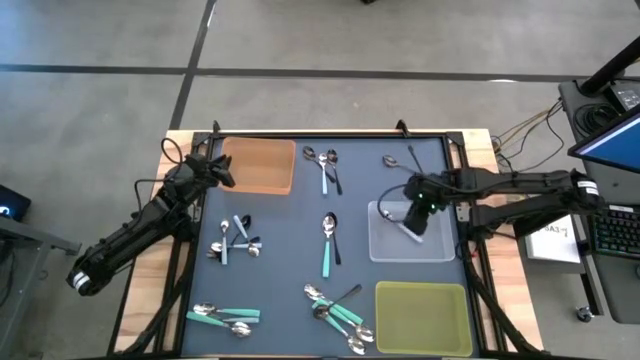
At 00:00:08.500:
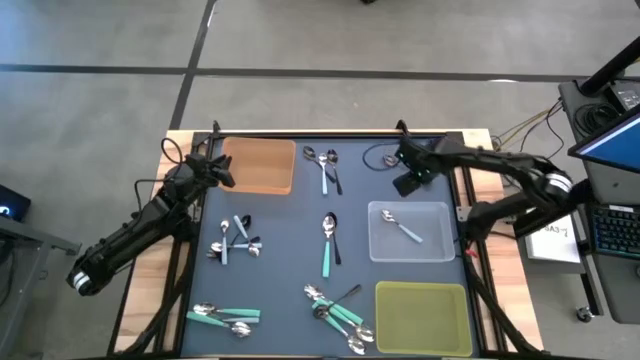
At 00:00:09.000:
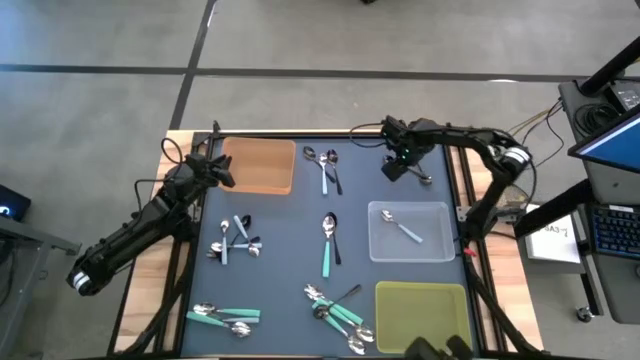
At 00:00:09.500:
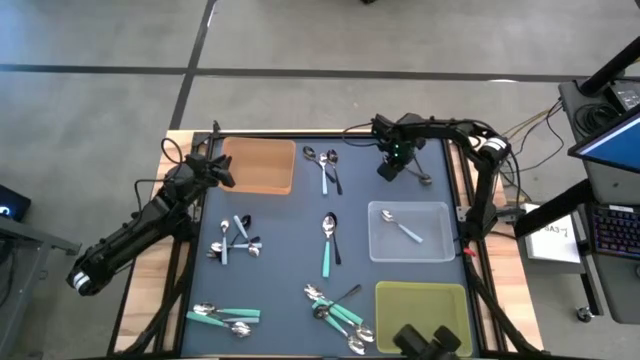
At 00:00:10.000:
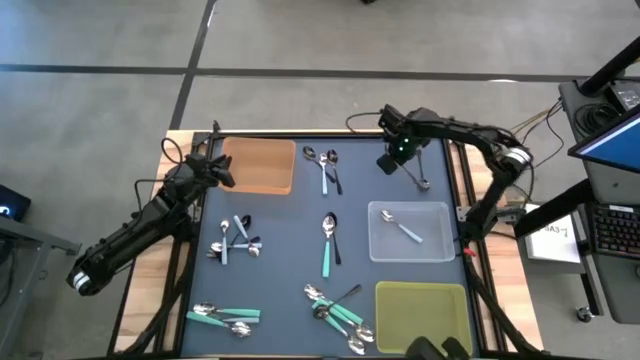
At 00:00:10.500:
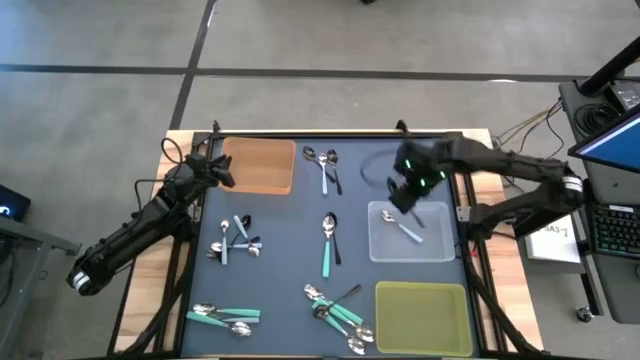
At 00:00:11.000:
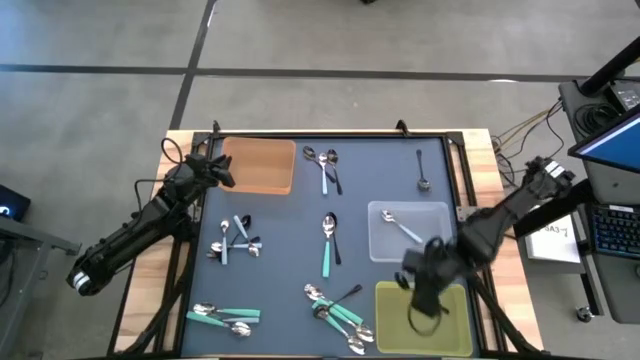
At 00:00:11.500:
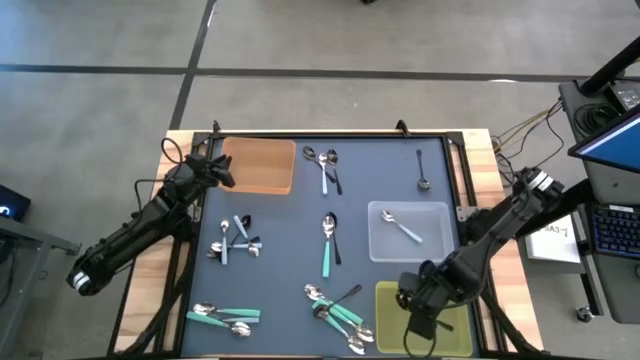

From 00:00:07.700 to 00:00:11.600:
Task: Sort silverware by color (type)
Put the black spoon into the yellow bin

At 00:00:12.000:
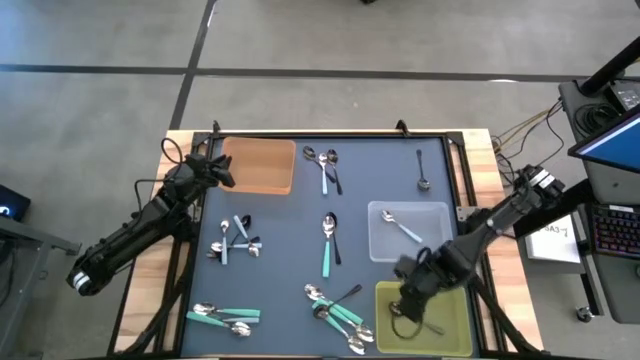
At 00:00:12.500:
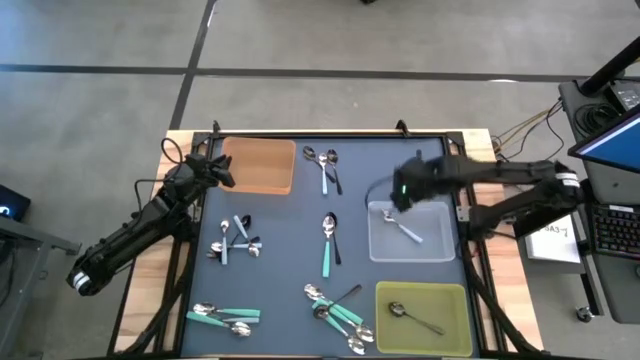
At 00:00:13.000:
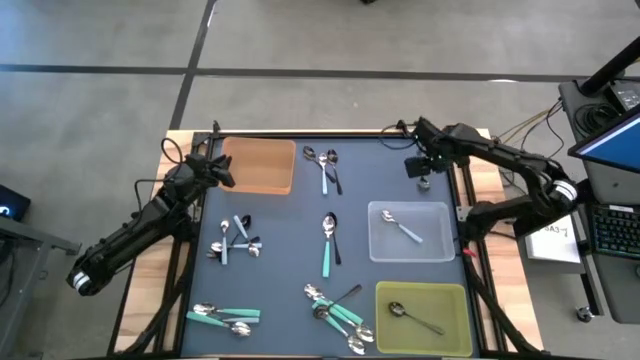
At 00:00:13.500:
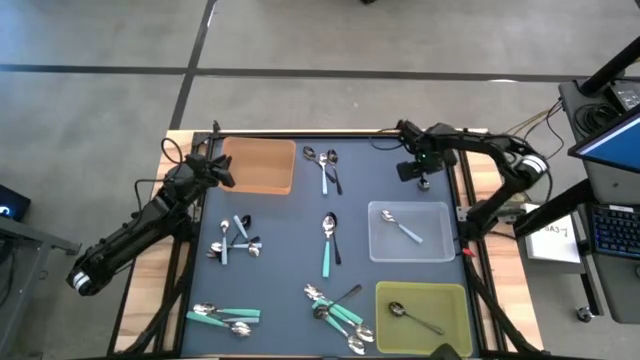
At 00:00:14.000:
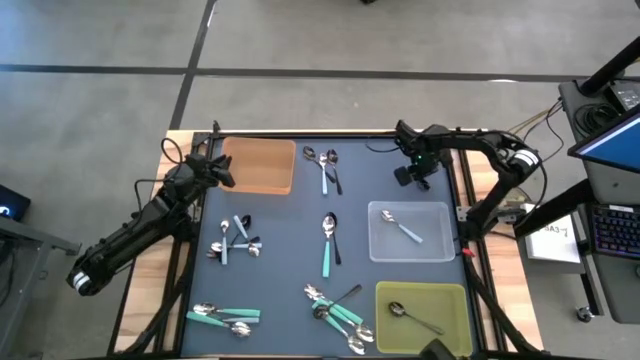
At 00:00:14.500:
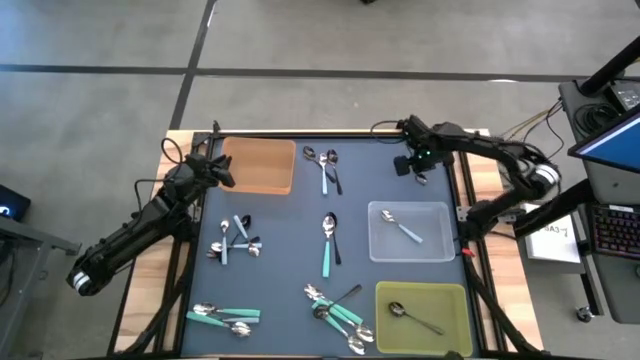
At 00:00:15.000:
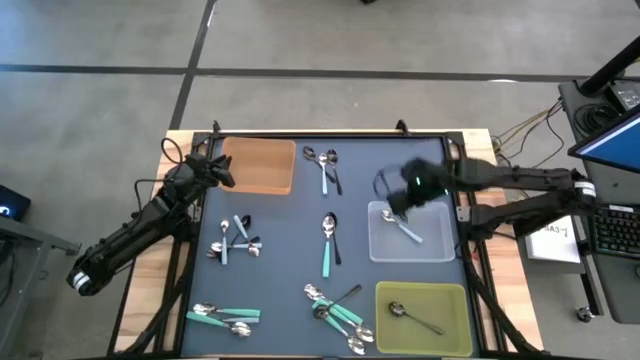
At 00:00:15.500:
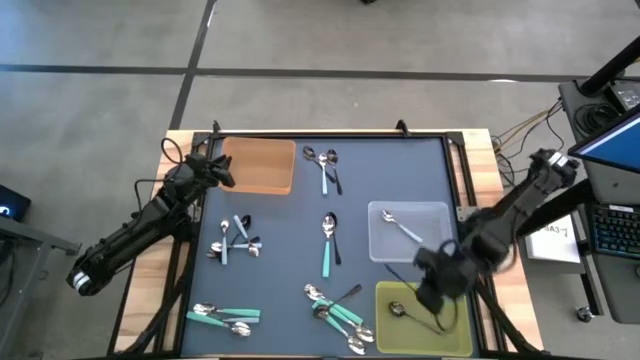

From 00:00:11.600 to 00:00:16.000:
Put the black spoon into the yellow bin

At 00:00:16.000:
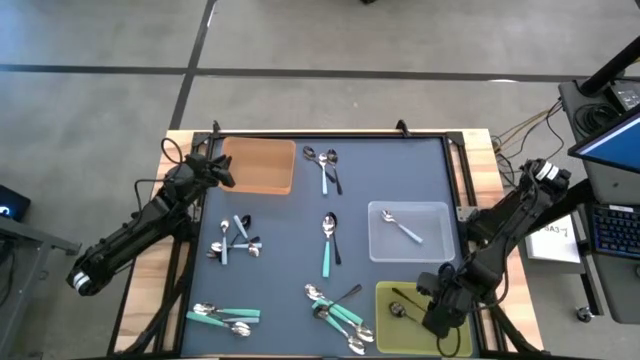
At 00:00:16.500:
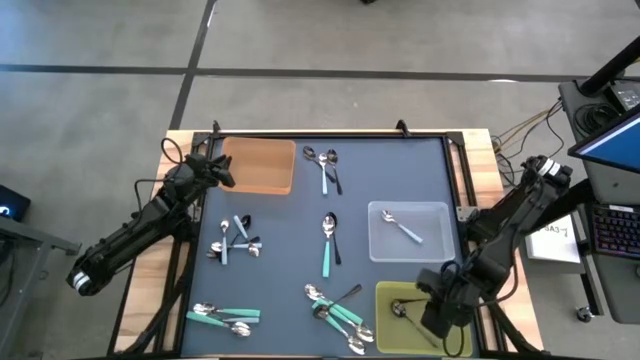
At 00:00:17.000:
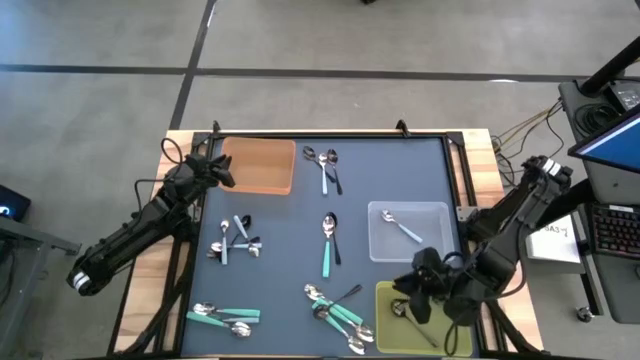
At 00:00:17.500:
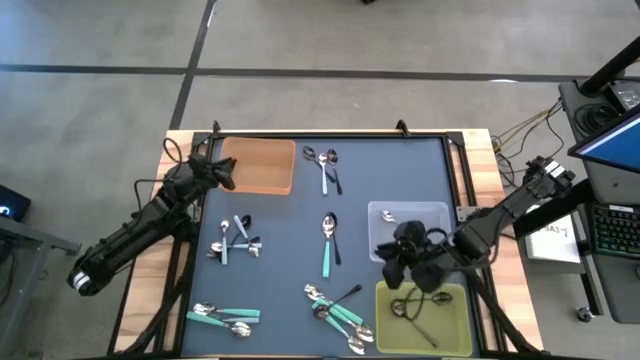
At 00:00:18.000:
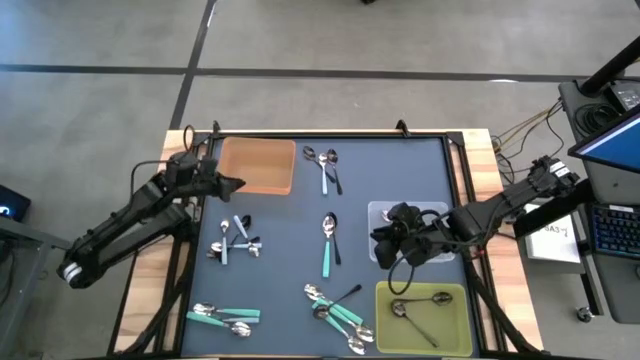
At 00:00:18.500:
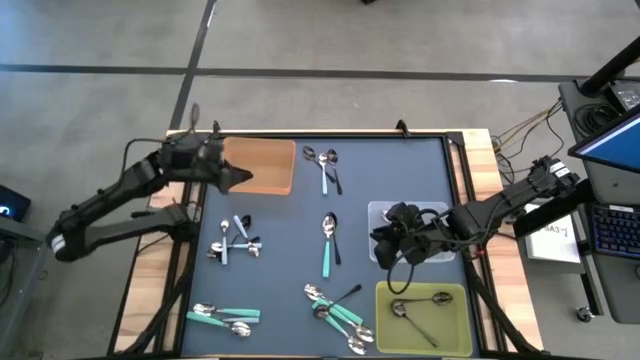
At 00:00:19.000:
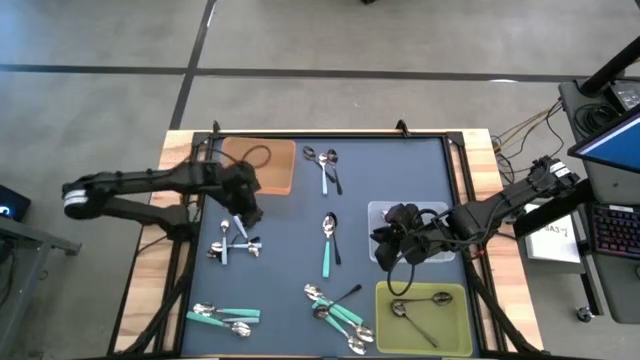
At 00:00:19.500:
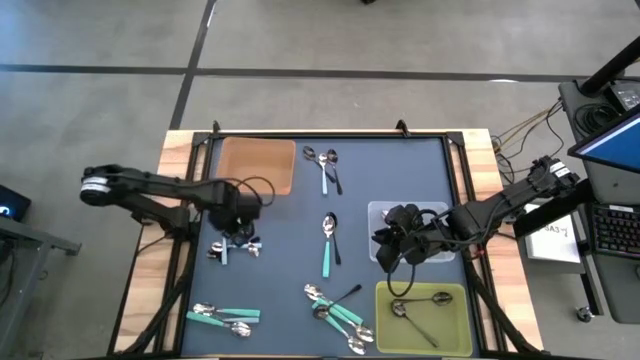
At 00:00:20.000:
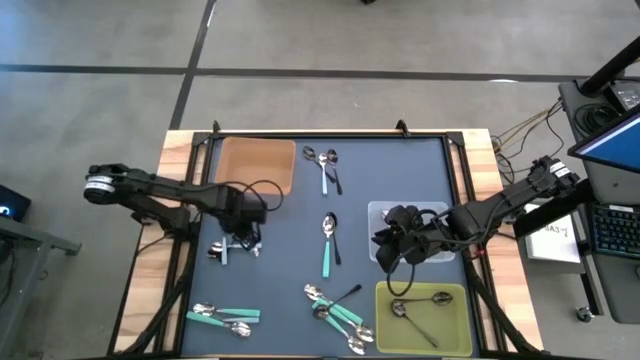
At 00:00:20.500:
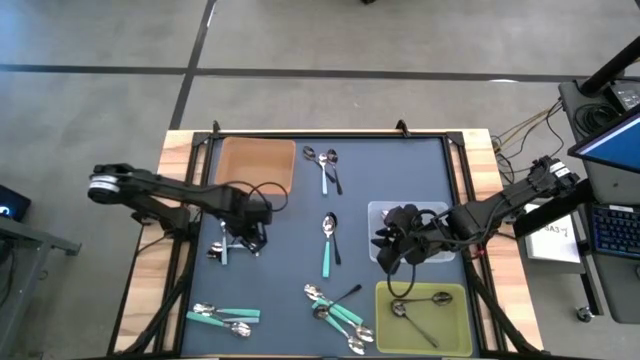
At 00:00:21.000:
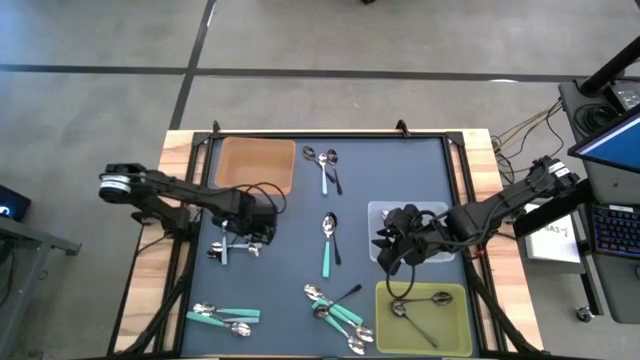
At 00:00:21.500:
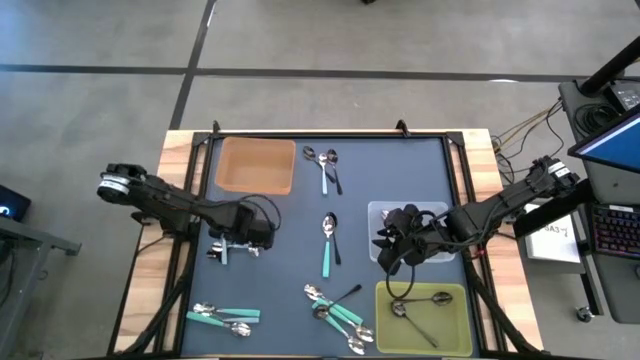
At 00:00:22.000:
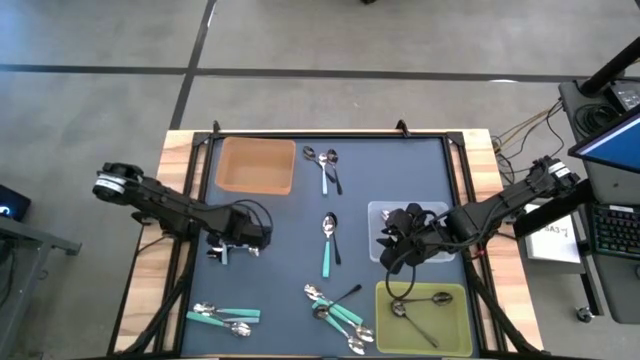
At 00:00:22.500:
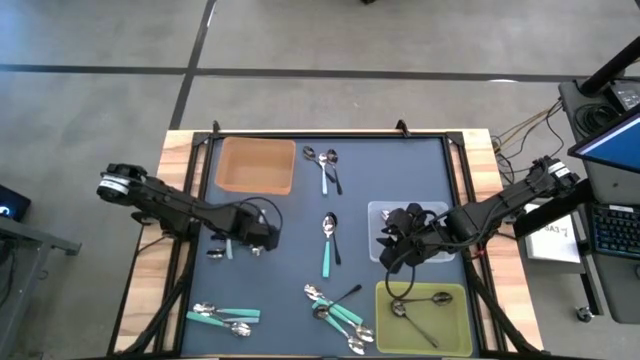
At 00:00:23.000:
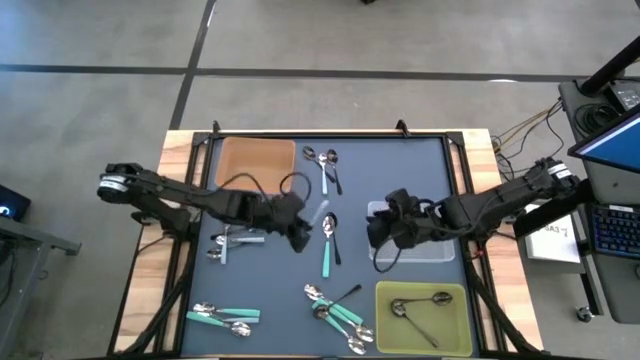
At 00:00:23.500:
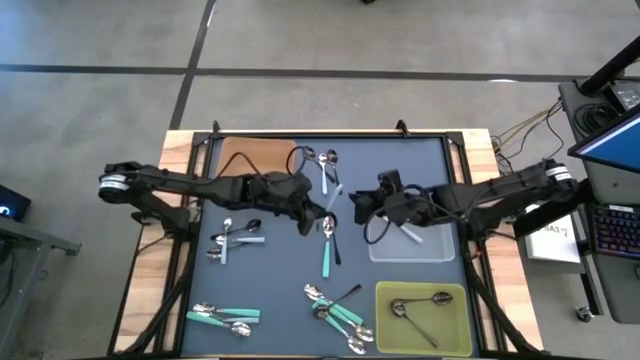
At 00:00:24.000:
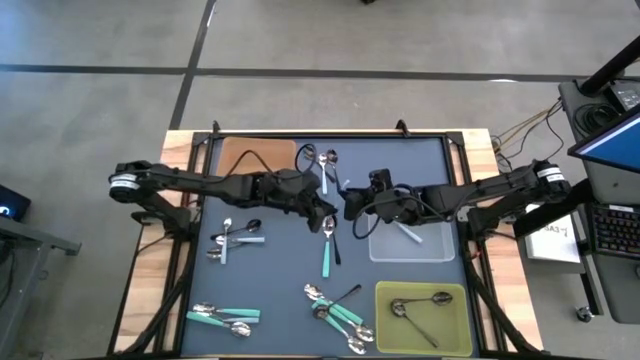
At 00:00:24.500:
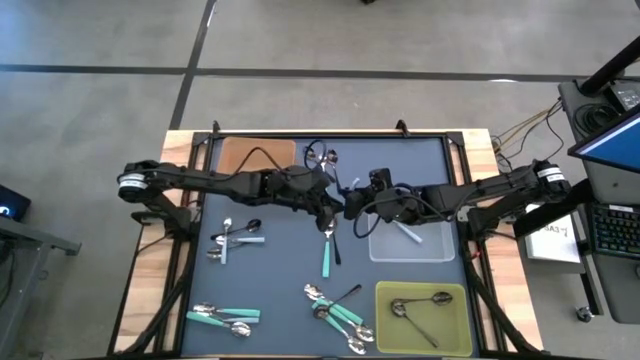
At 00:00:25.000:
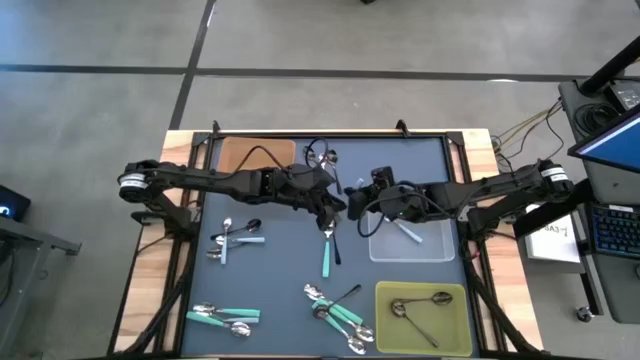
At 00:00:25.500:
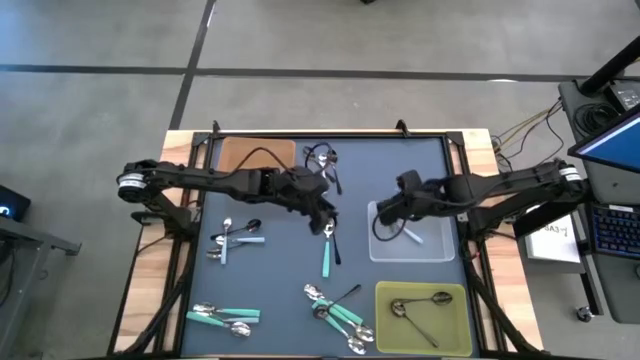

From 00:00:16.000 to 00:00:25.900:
Put the white spoon into the transparent bin

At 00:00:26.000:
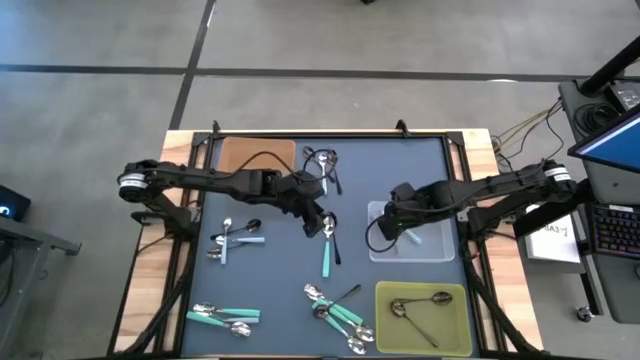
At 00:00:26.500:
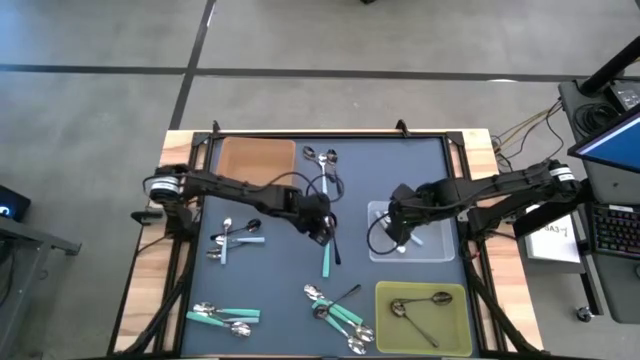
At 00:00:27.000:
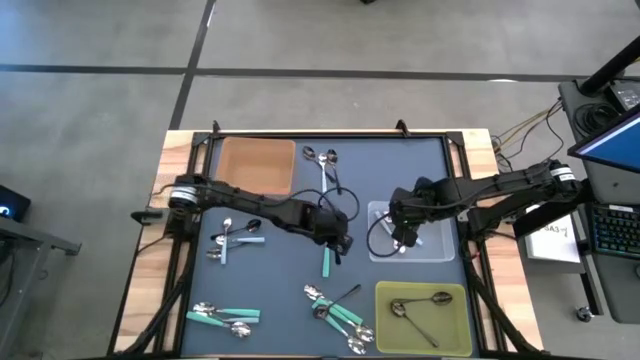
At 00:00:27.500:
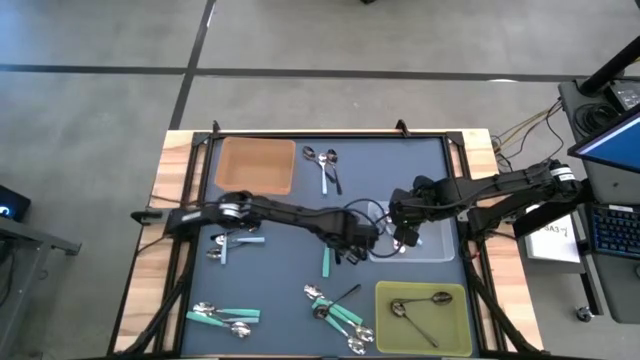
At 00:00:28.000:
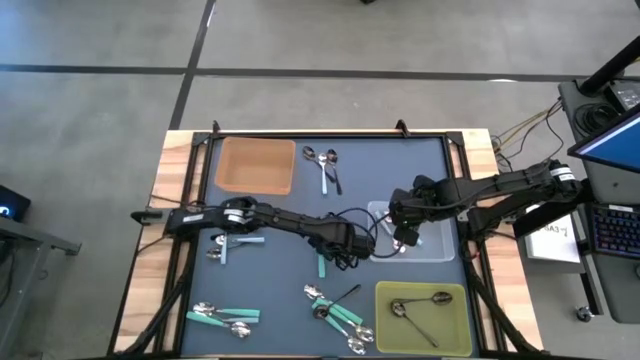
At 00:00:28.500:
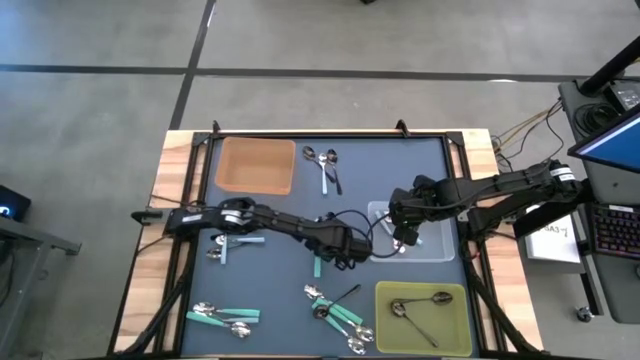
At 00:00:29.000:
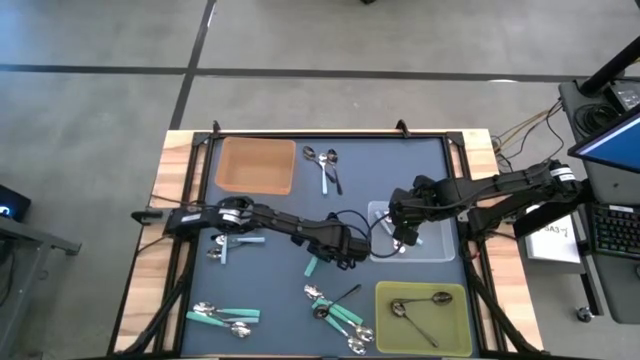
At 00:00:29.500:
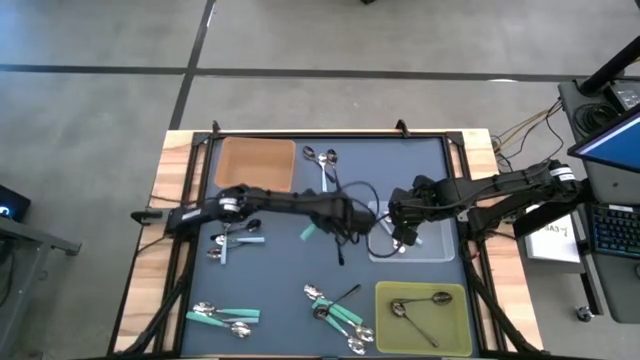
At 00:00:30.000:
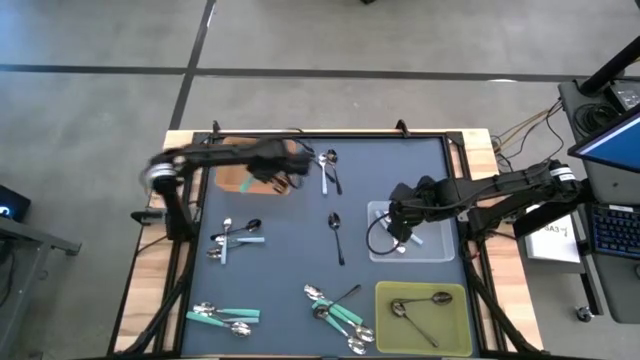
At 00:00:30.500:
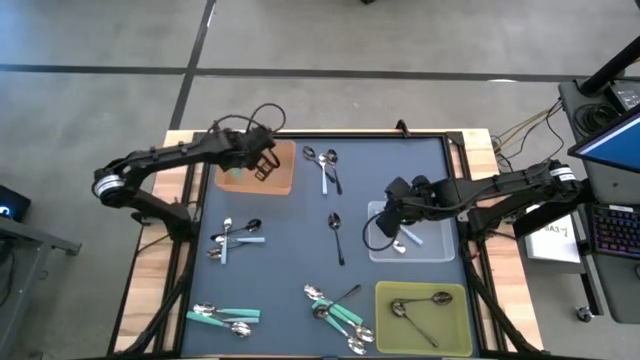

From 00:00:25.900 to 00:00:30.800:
Put the green spoon into the orange bin
